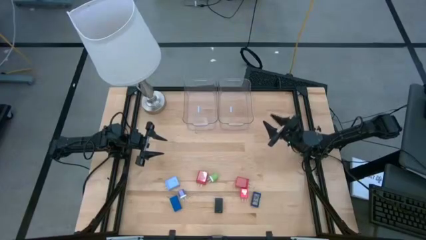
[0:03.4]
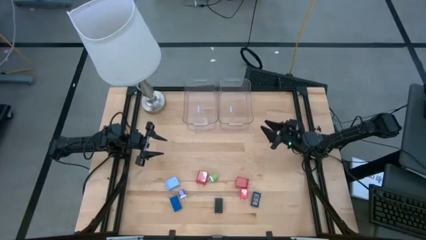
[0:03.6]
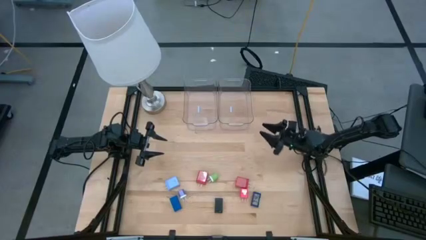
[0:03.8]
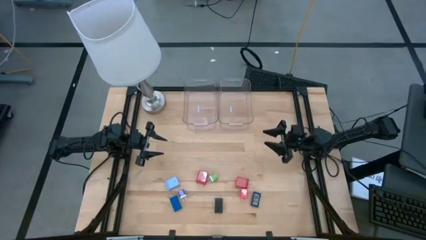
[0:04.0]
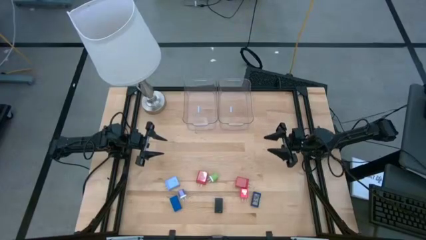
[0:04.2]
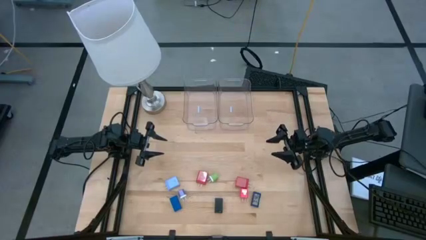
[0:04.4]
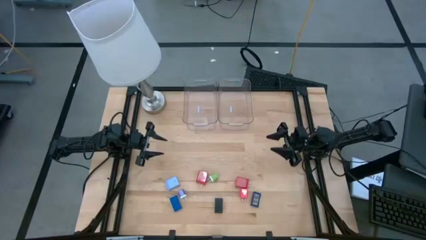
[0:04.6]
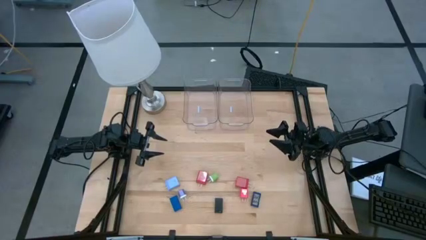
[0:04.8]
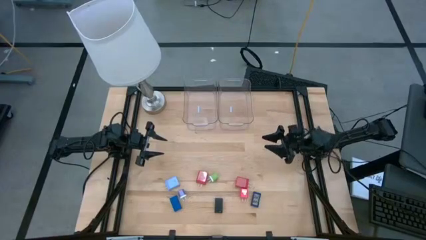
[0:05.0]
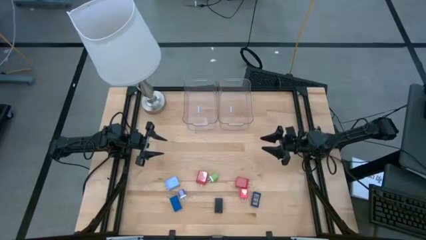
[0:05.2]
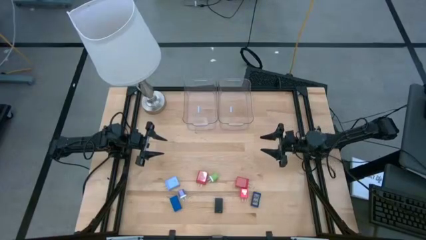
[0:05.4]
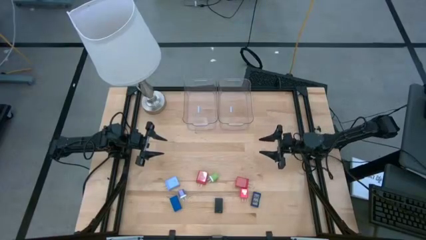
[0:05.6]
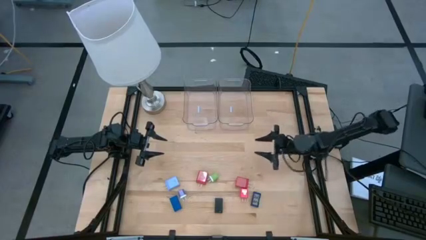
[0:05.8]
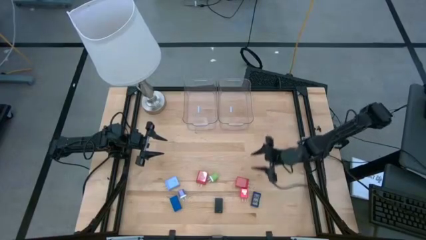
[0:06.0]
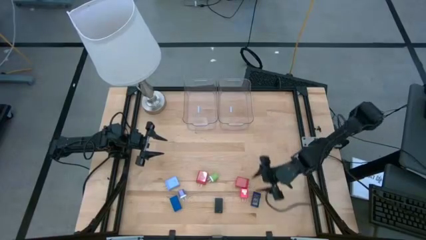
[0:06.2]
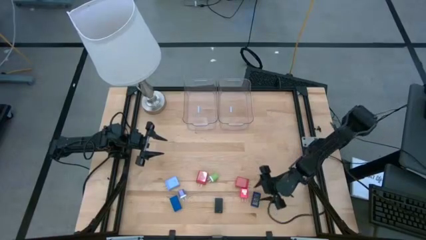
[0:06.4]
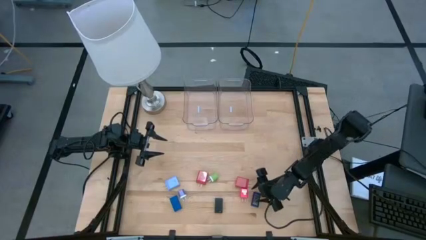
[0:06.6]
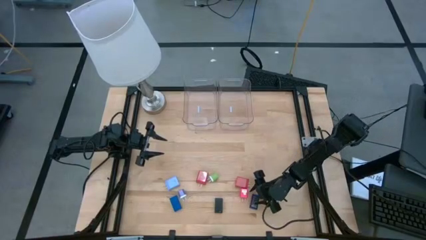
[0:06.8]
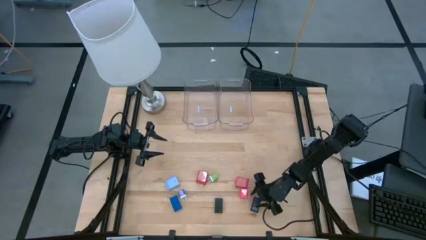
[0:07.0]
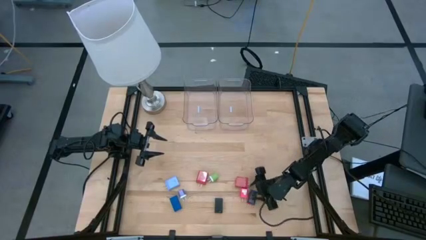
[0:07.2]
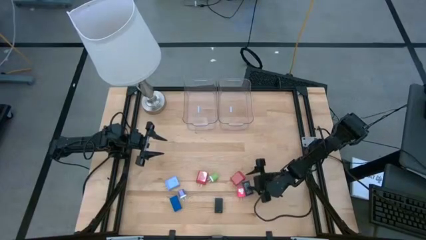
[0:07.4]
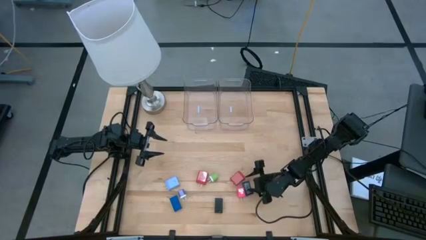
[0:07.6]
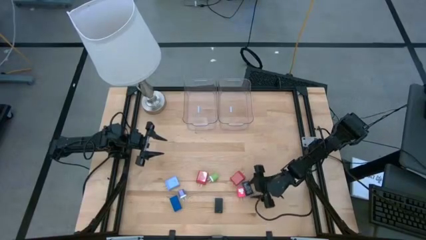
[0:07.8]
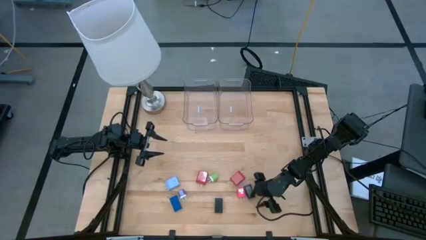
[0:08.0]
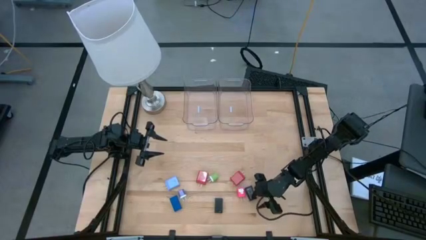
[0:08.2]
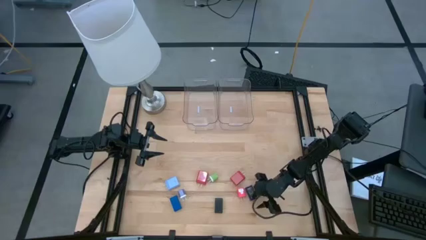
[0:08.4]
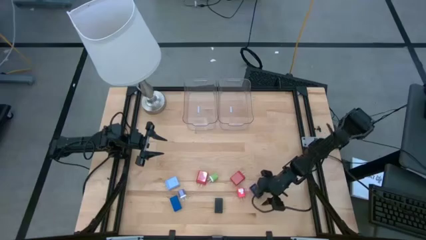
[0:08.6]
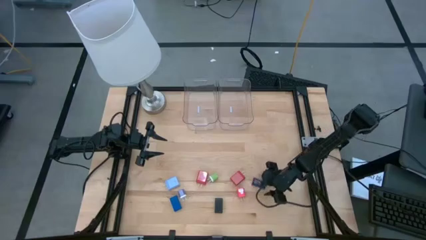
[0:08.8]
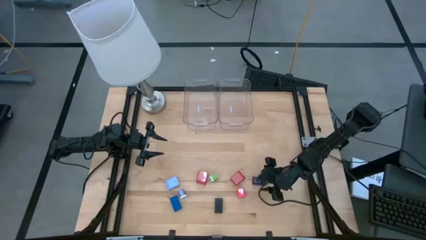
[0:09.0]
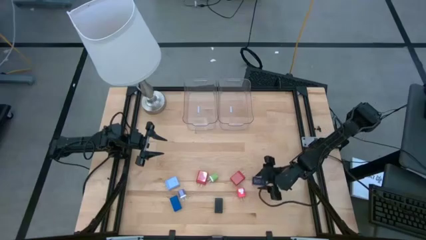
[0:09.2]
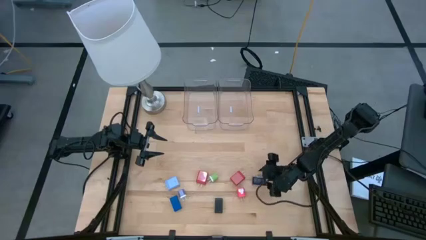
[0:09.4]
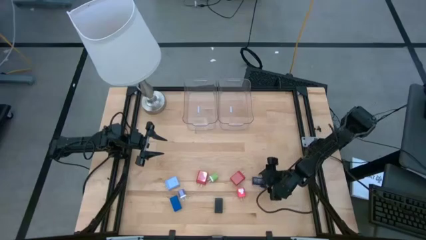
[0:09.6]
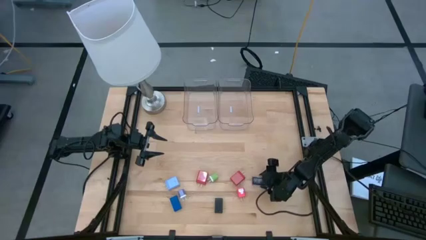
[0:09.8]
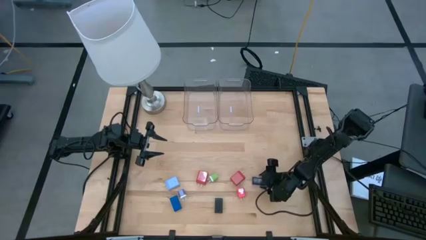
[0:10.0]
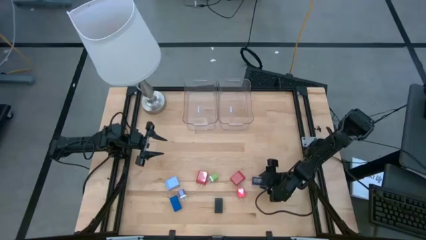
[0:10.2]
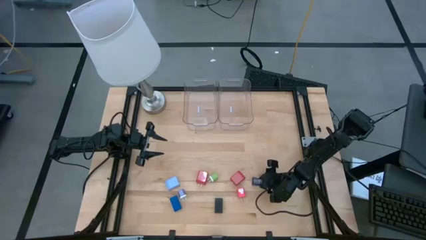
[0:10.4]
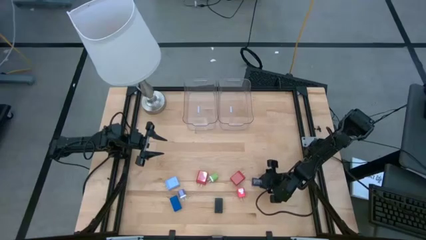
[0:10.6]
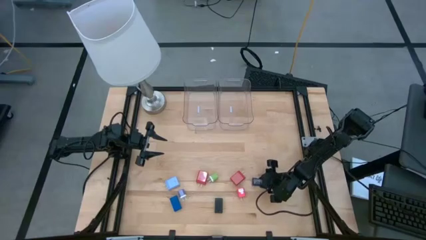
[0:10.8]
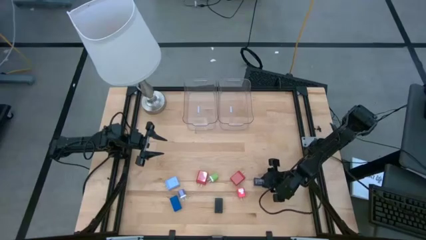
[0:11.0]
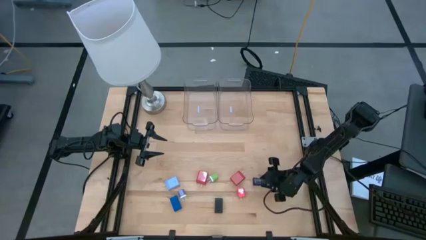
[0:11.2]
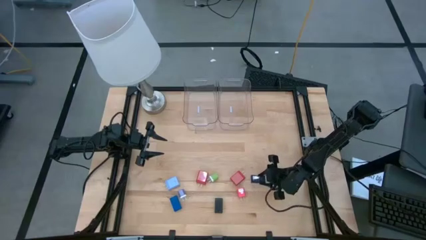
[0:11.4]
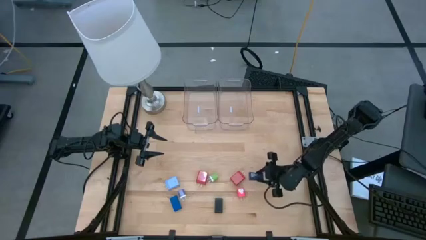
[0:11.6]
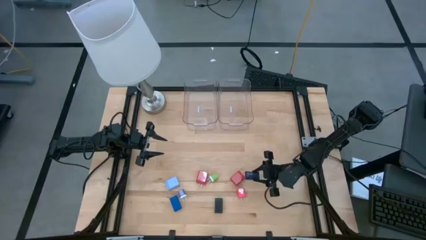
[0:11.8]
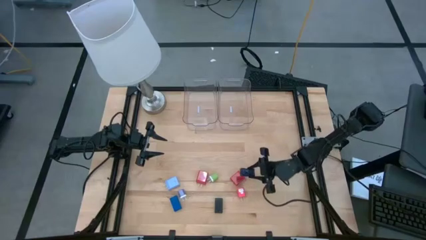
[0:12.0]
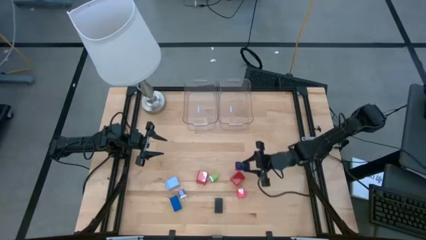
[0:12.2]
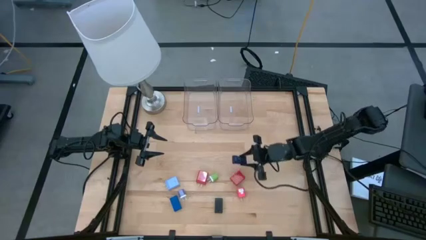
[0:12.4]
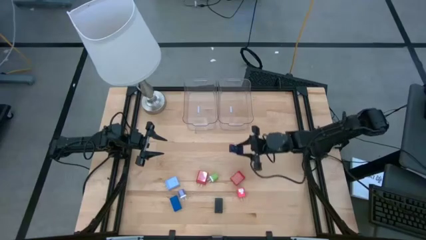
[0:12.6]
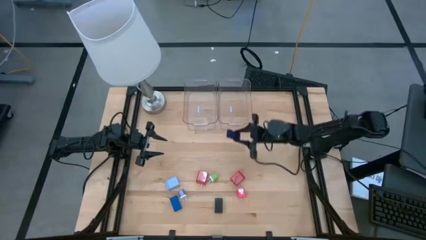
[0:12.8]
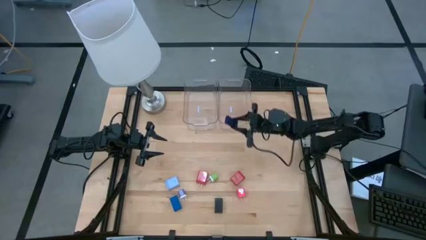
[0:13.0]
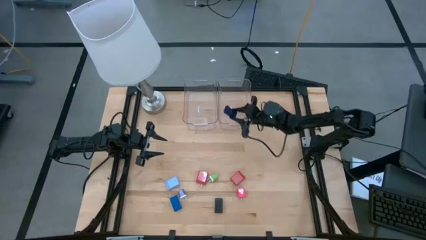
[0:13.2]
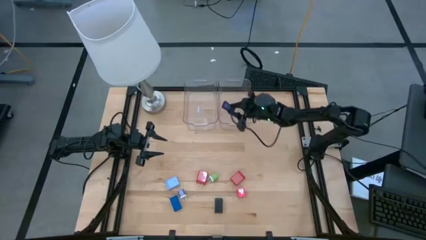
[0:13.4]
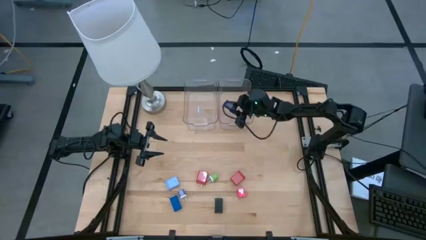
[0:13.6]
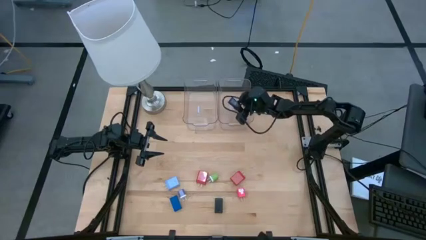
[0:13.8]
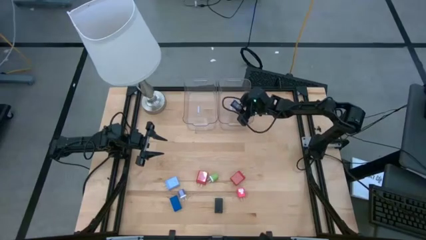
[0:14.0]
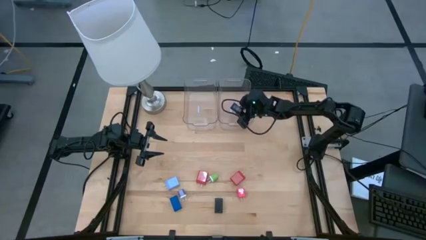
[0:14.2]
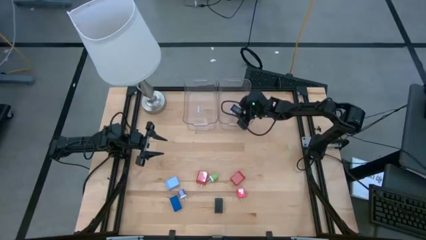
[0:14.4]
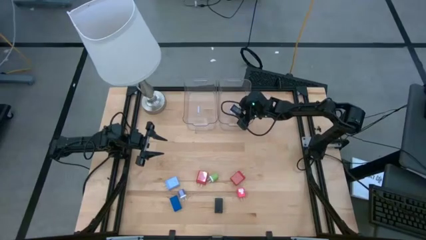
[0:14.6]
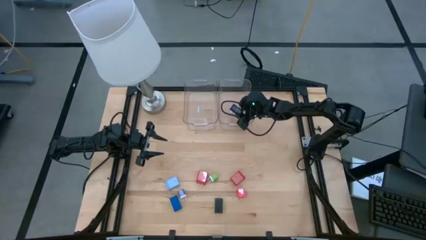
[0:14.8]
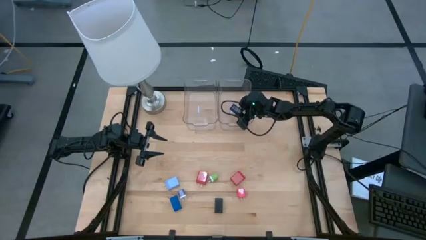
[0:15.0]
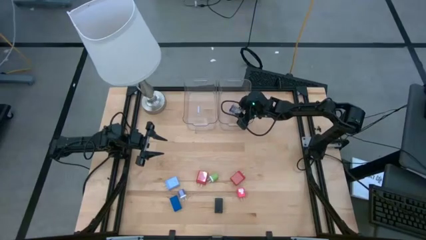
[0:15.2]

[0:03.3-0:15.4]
Task: Pick & Place Office items
Put the blue timer into the right transparent bin
